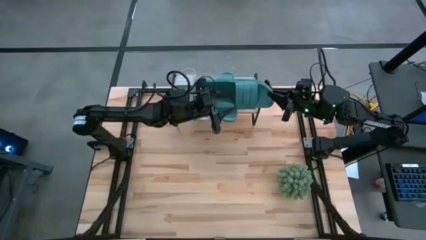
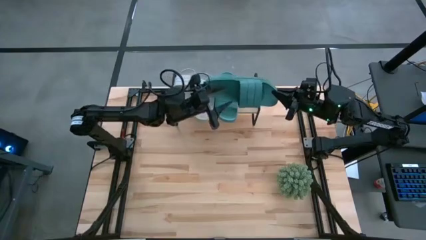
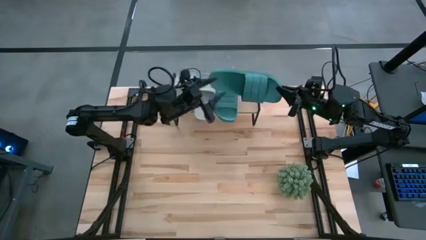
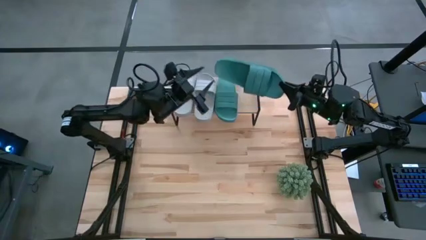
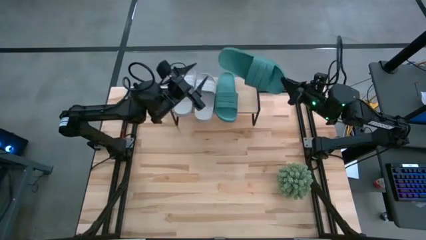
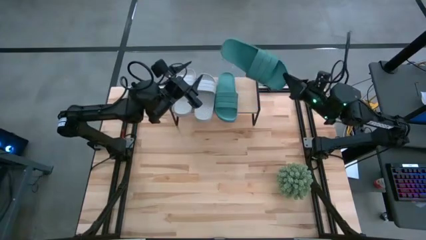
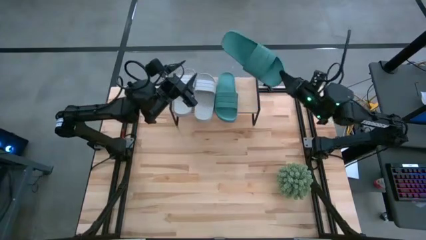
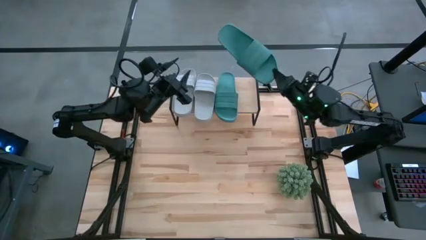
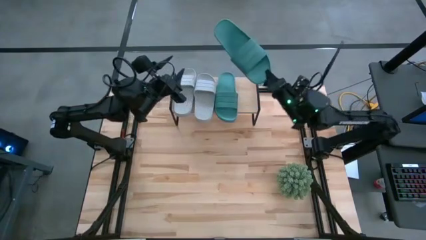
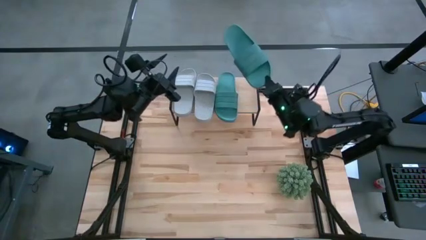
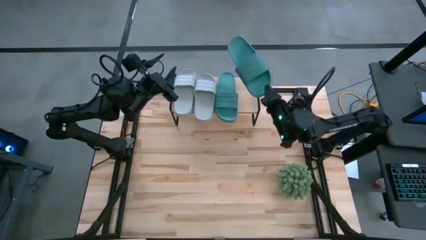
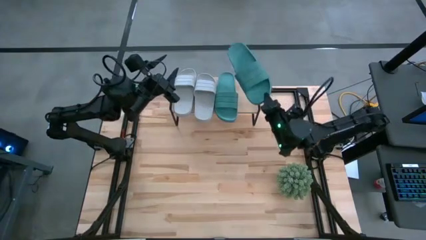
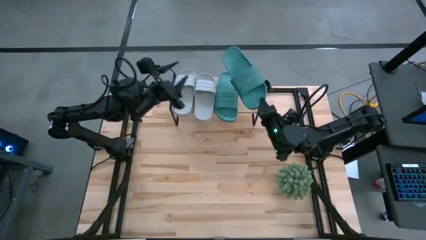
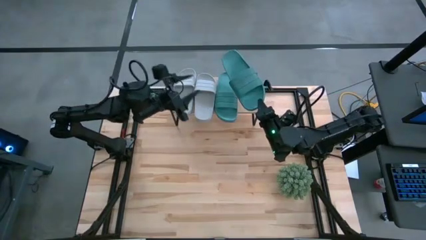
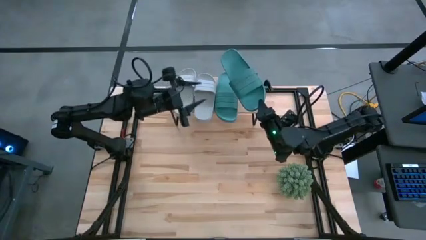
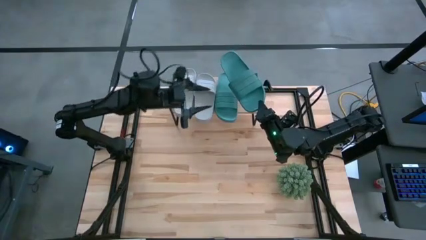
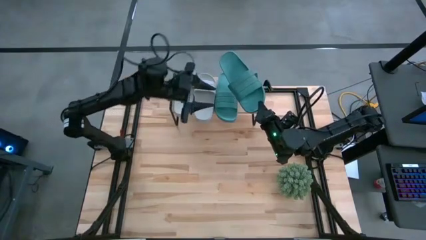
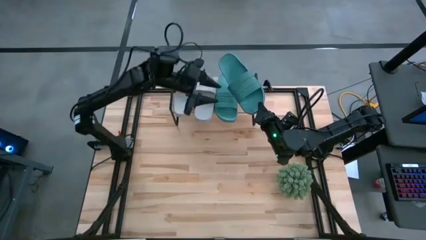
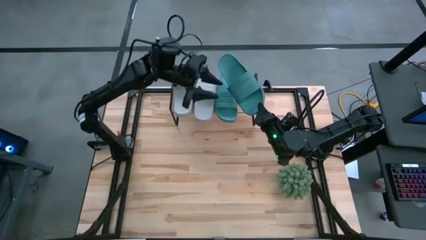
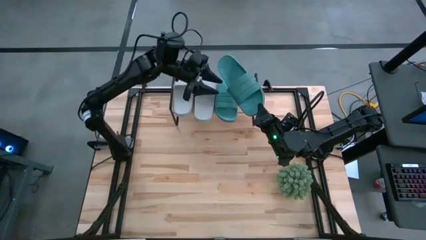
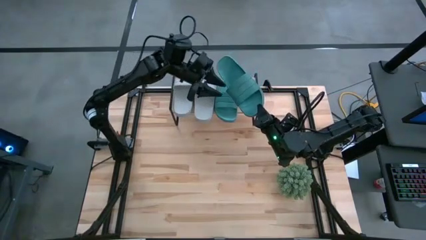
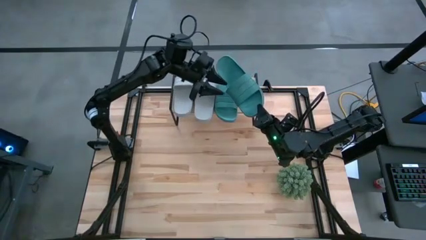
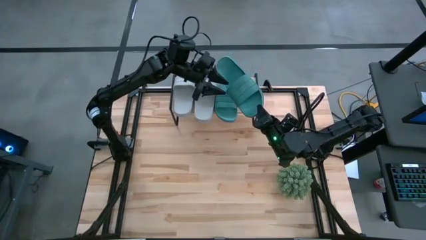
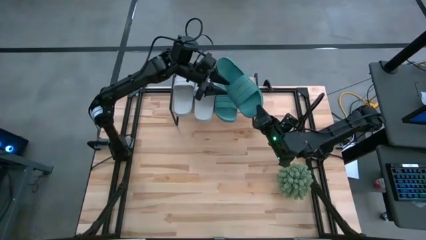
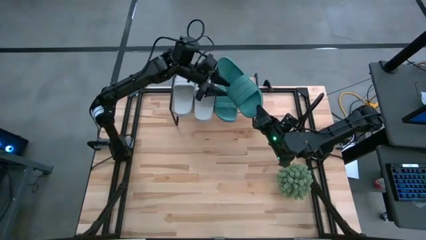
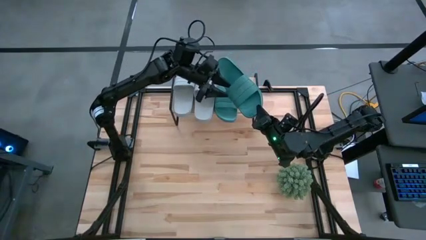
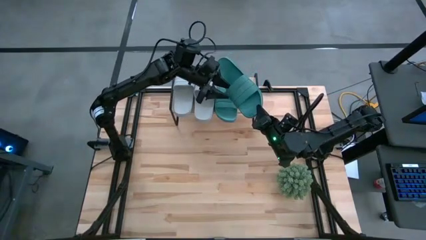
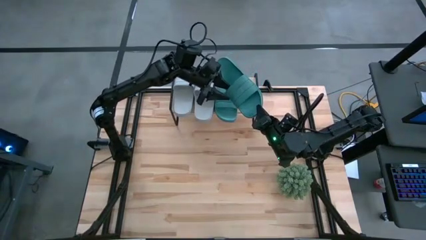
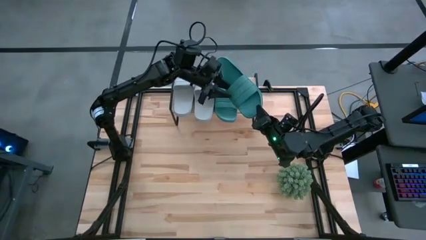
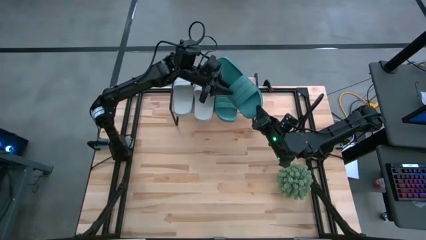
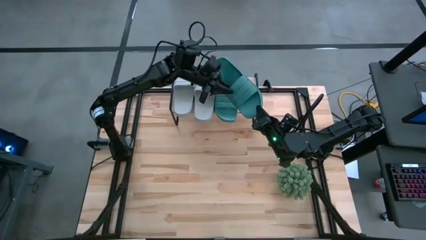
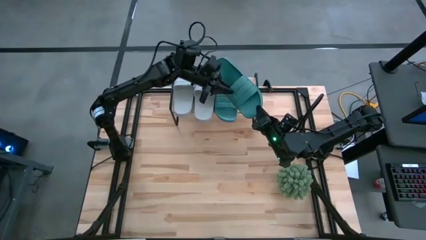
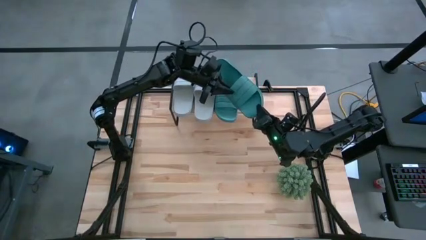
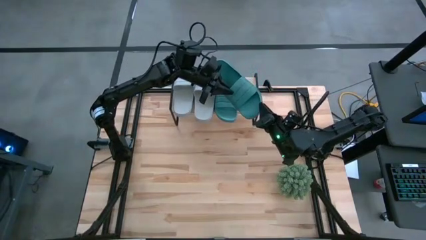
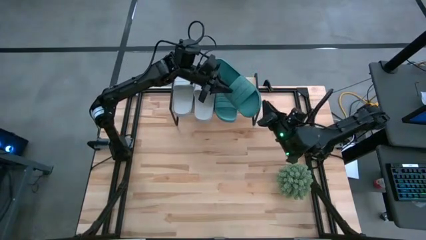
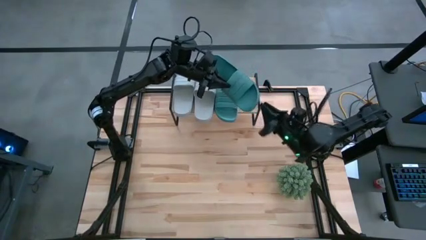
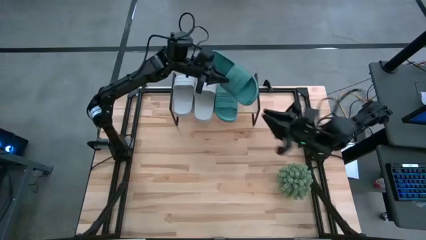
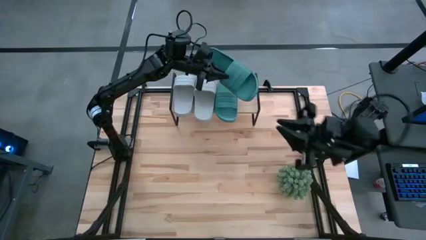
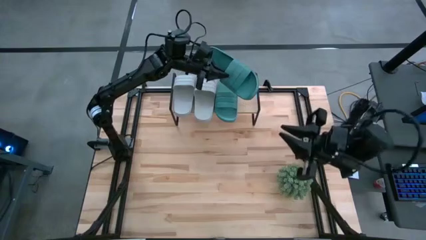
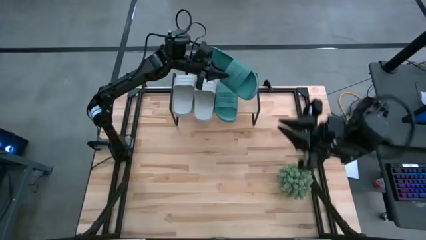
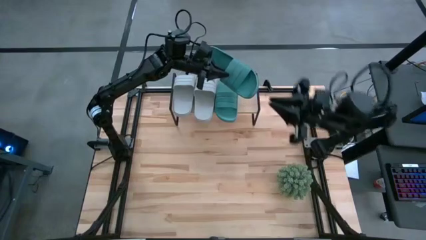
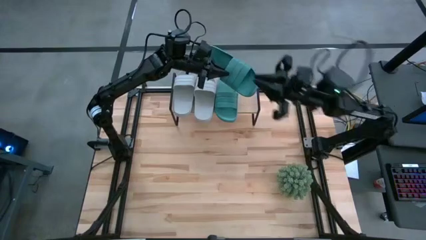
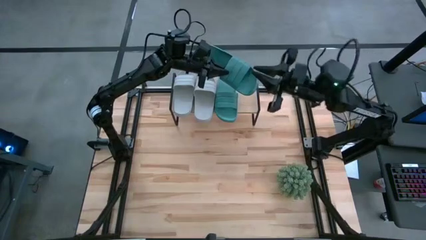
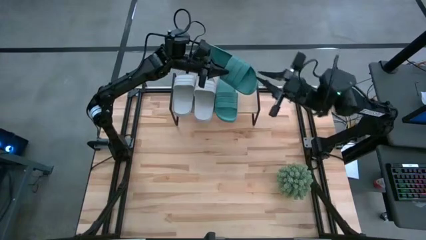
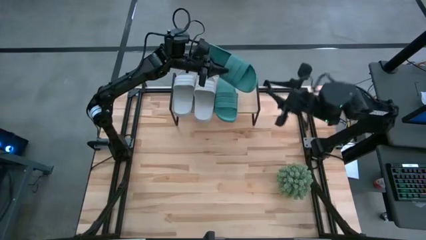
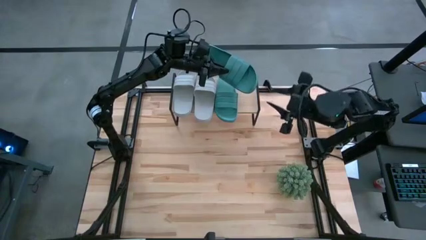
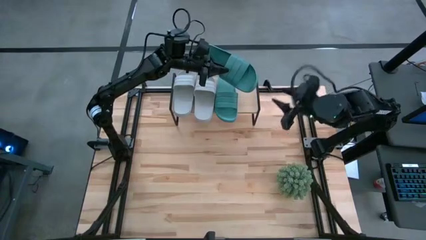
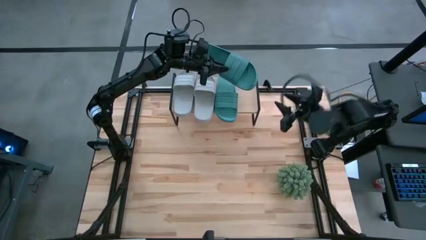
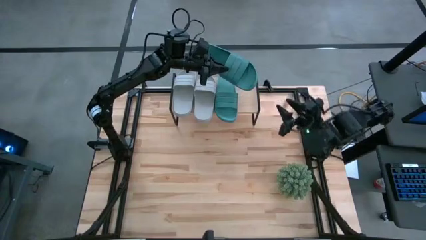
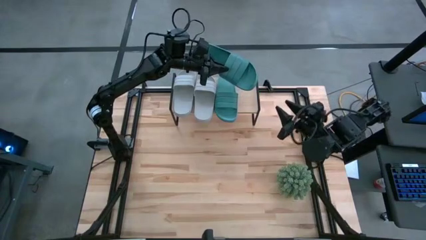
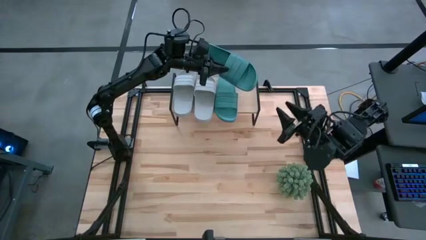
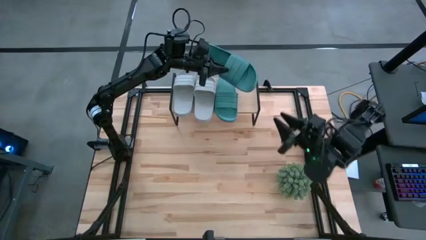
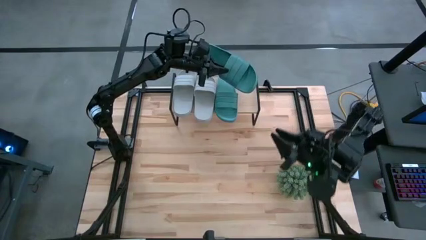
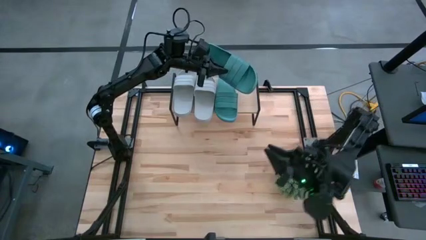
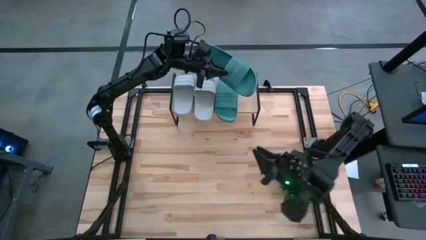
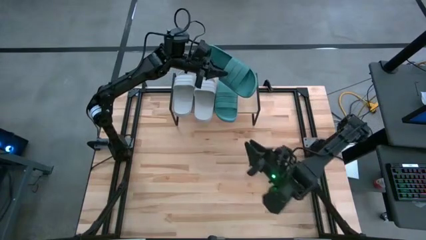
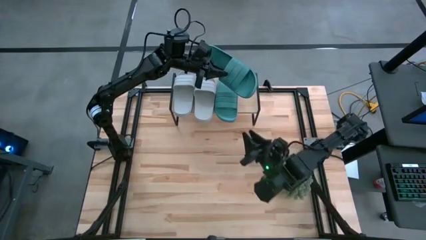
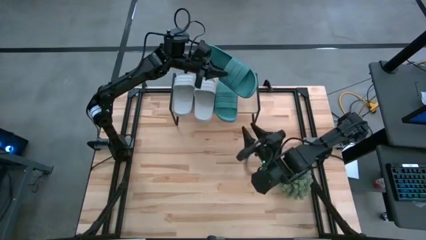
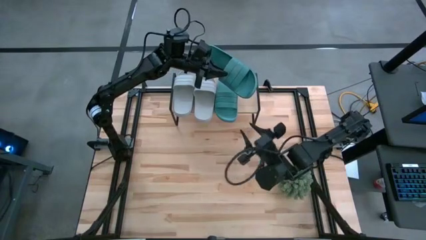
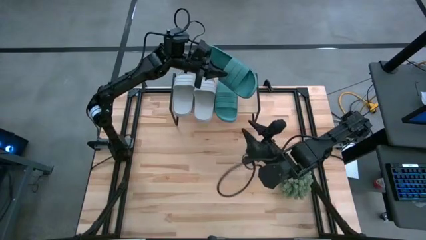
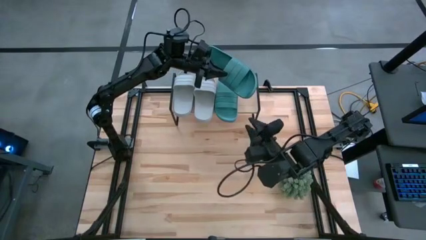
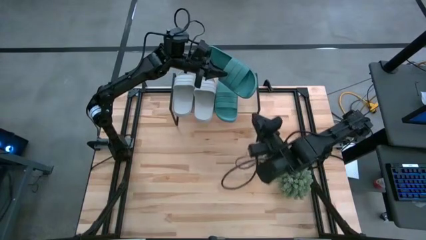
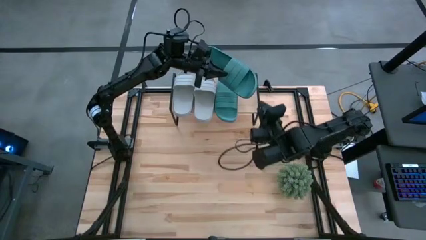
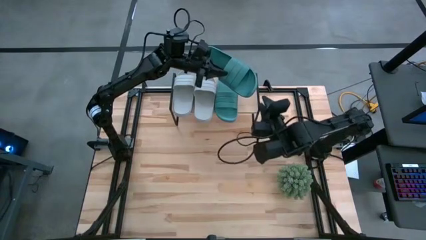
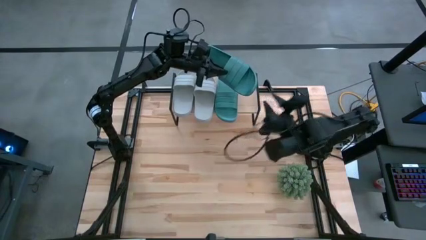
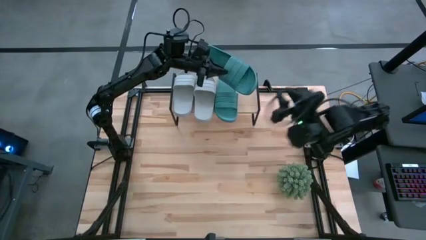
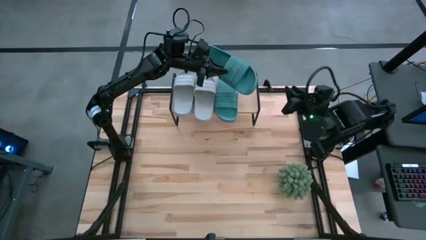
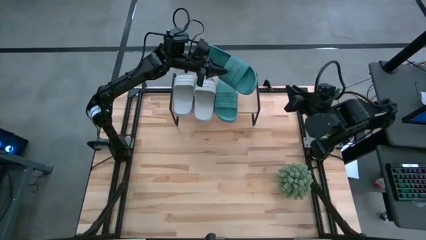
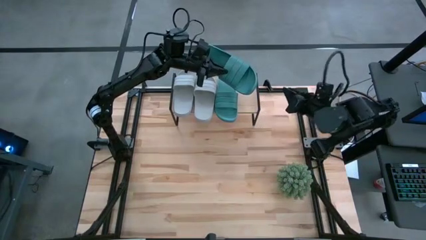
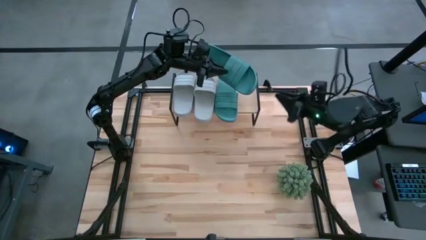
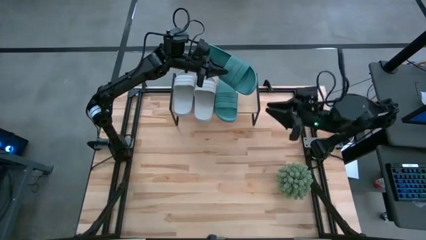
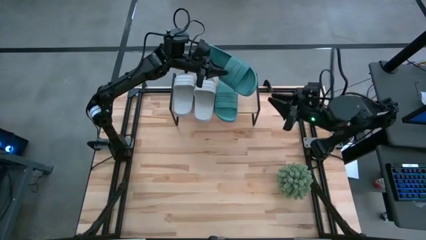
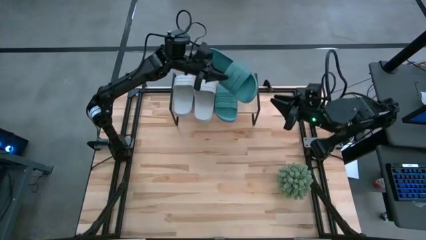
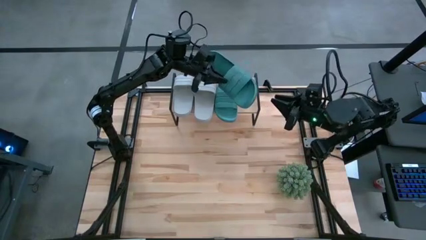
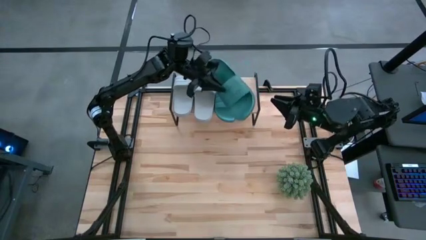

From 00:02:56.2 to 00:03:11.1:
Task: Pick and place slides into the shelf
Put the green slide on the shelf

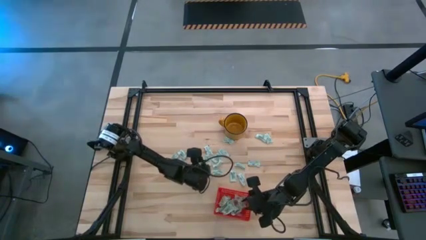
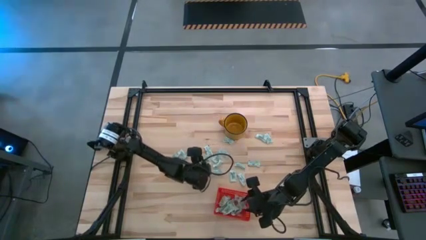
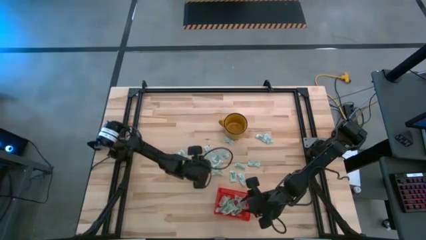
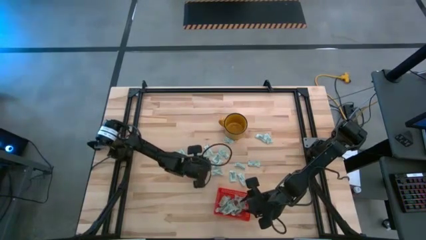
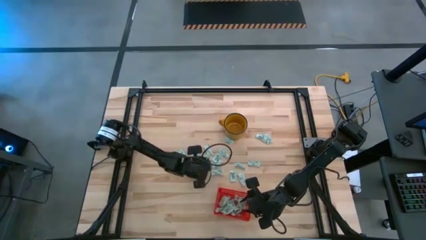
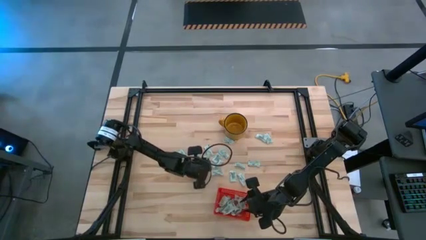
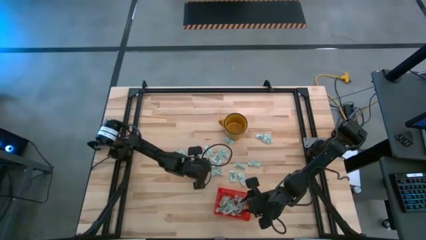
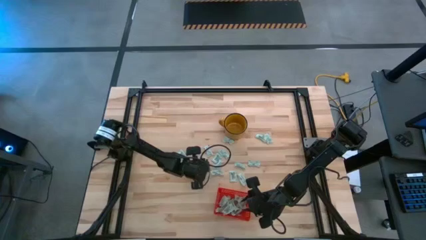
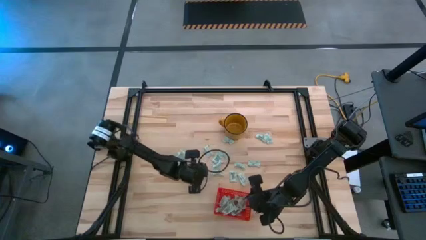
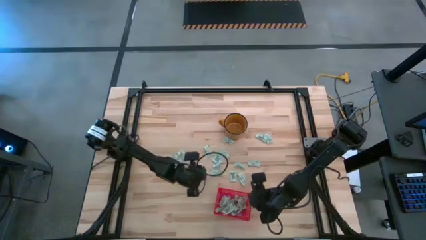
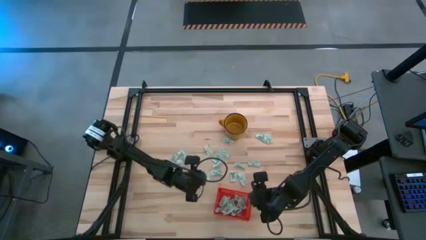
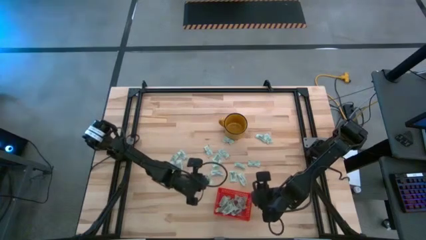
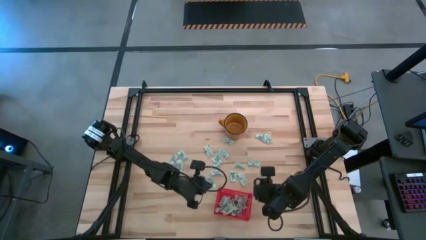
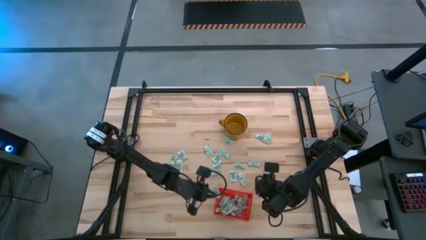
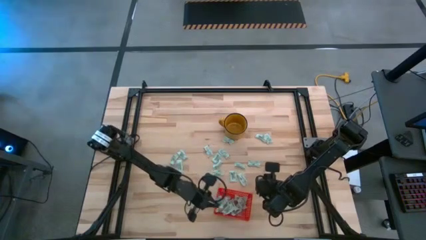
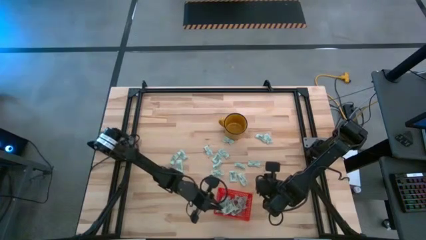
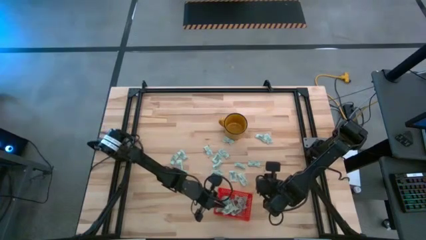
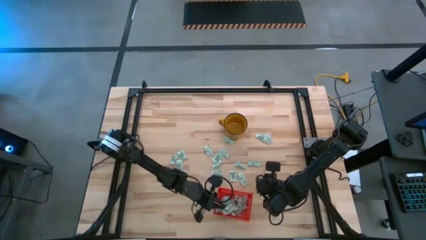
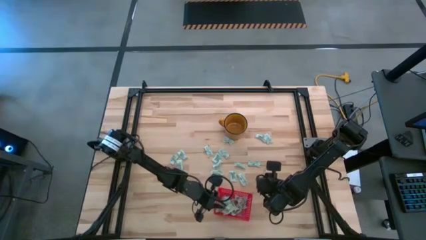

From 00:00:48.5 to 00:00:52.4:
Task: Pick and place Stevia / Truvia into bins
Put the stevia packet into the bin
